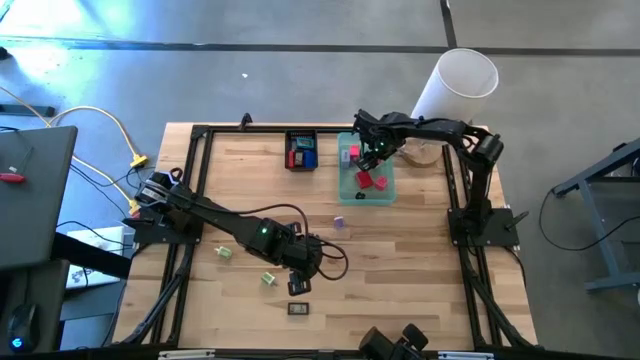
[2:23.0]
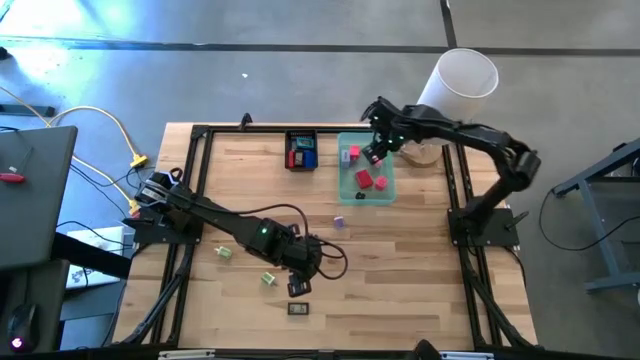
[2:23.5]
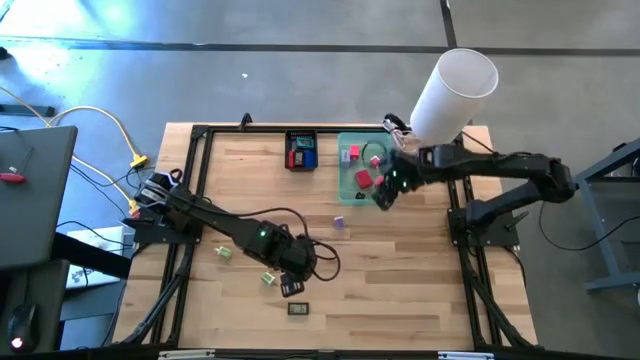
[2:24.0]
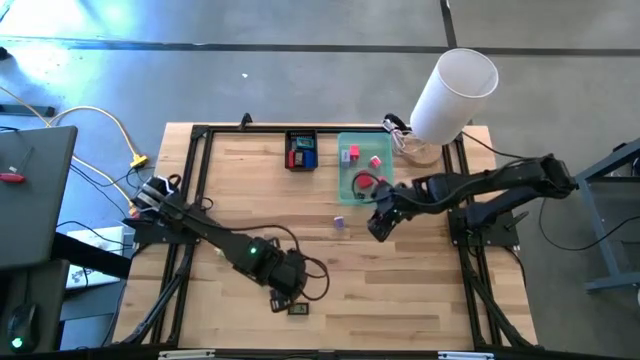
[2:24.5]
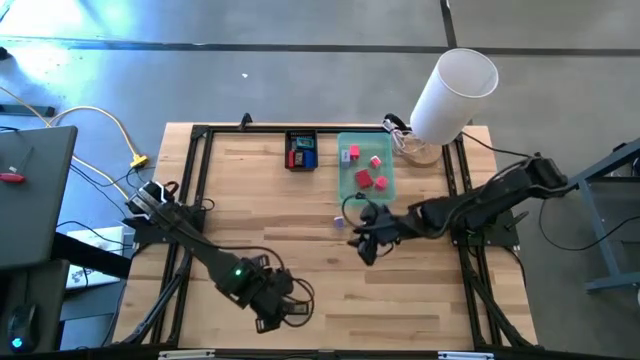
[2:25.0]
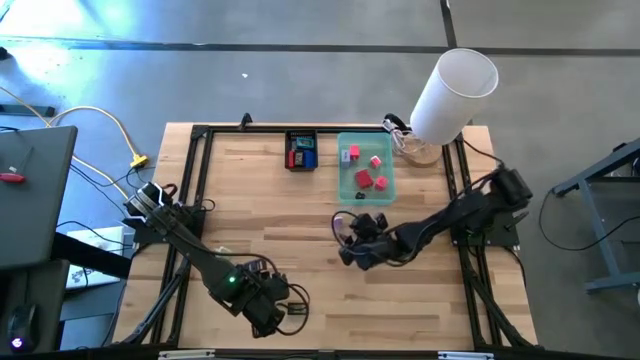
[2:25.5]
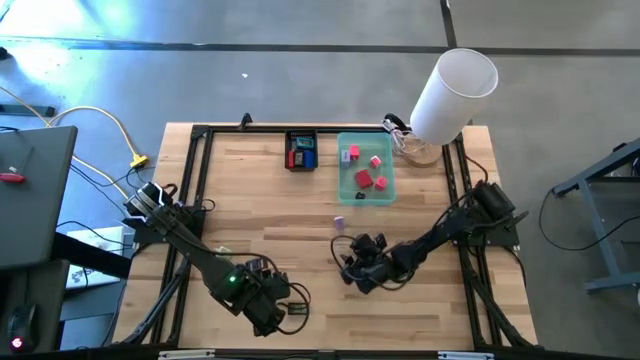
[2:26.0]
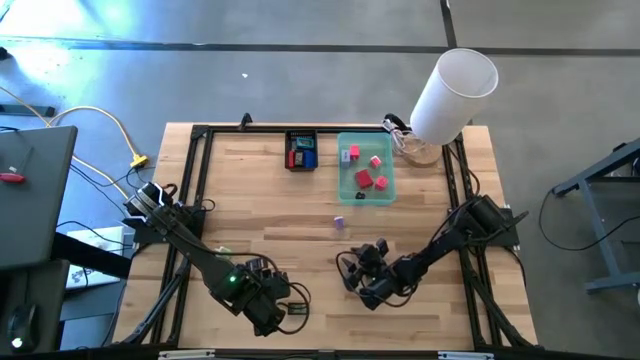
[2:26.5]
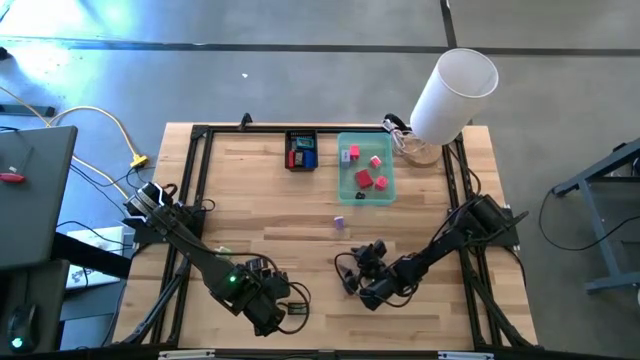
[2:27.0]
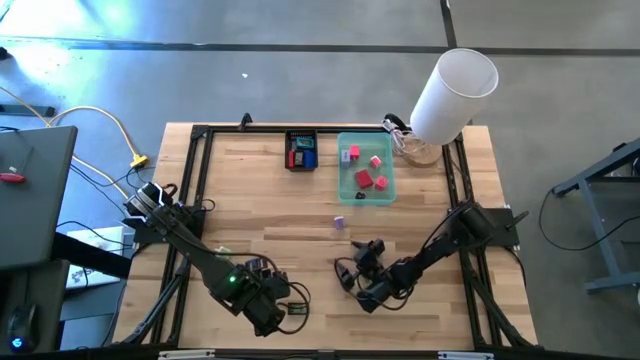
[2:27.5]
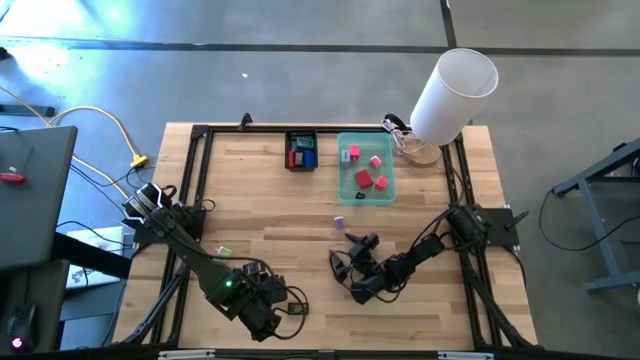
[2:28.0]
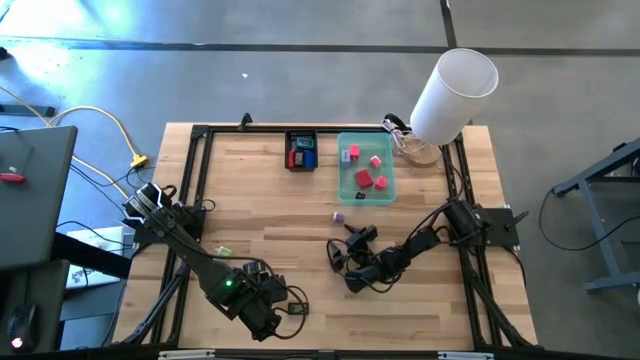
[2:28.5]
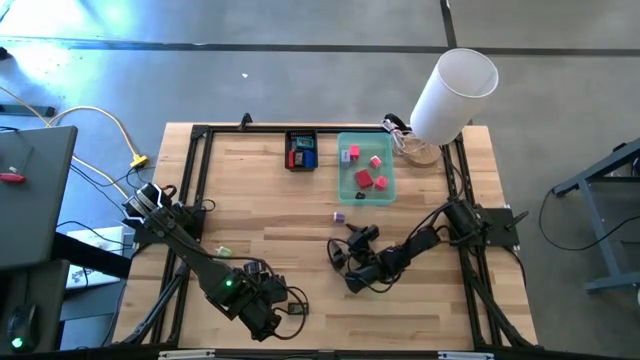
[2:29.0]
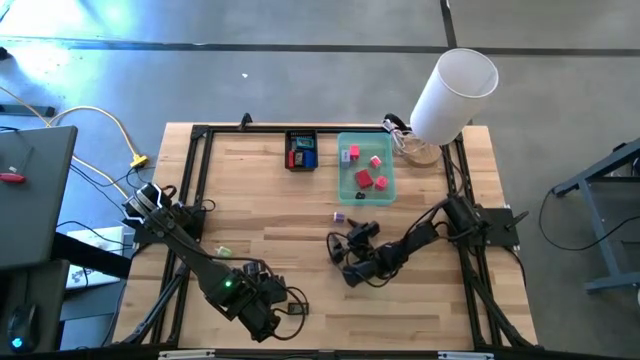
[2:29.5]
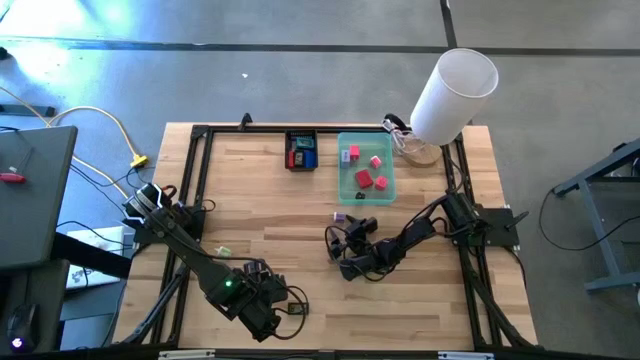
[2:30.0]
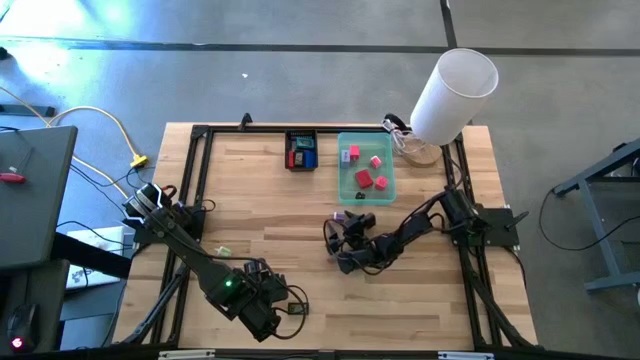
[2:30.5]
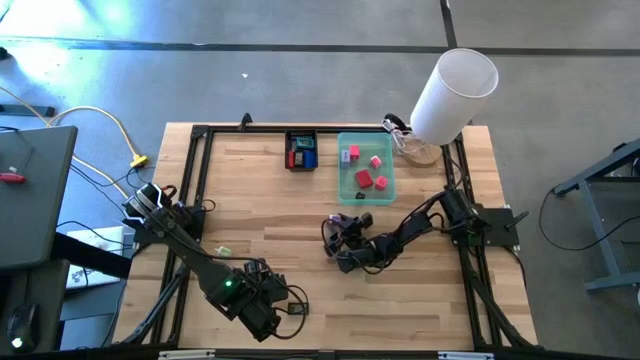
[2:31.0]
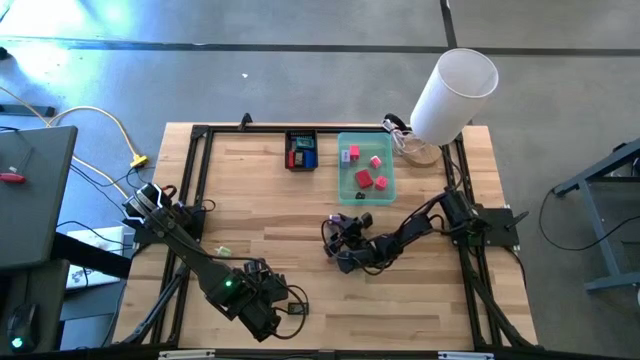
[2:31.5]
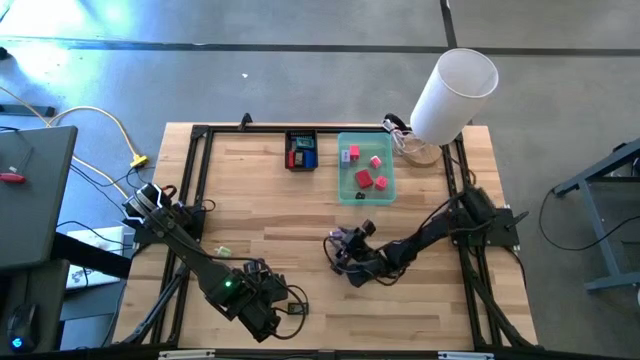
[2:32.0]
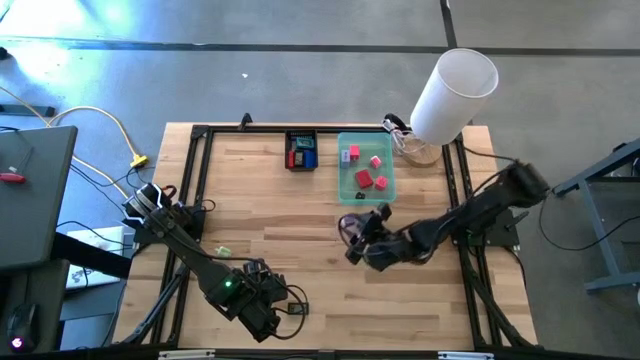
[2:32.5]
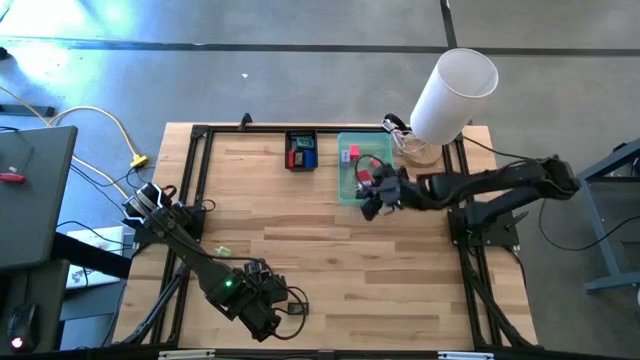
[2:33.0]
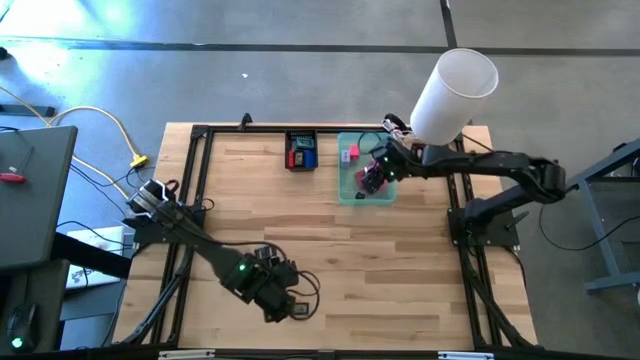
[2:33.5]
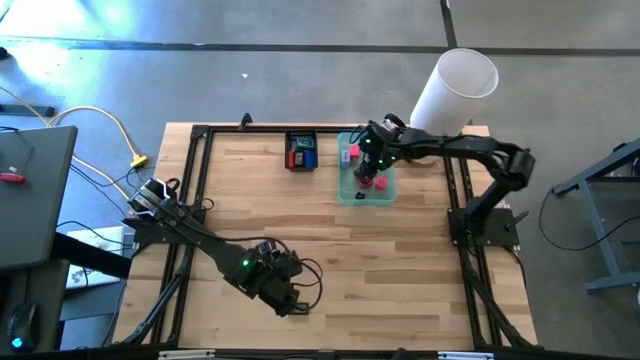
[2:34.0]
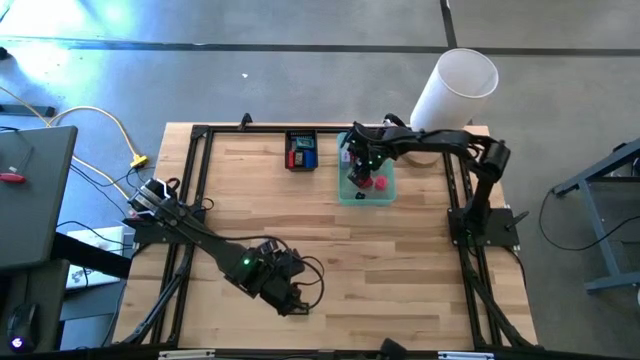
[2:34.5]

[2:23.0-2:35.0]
Task: Pick & Place Office items
Put the dark violet charger adapter into the blue bin

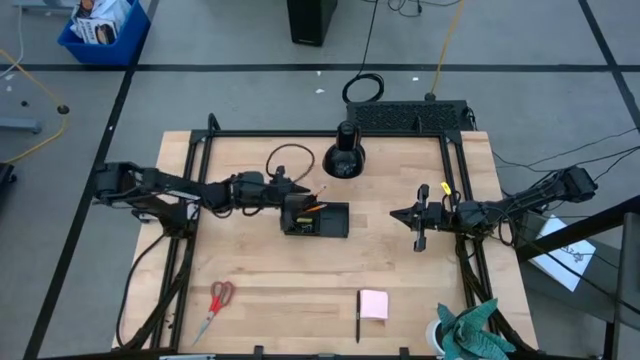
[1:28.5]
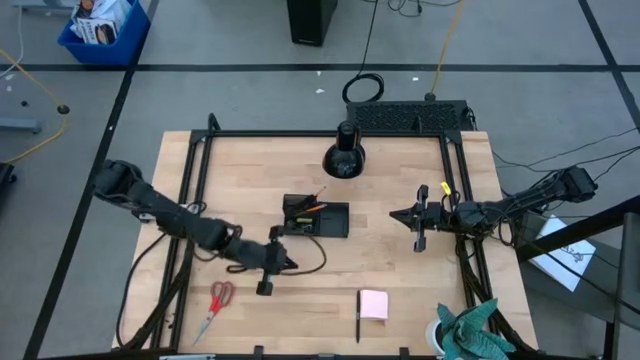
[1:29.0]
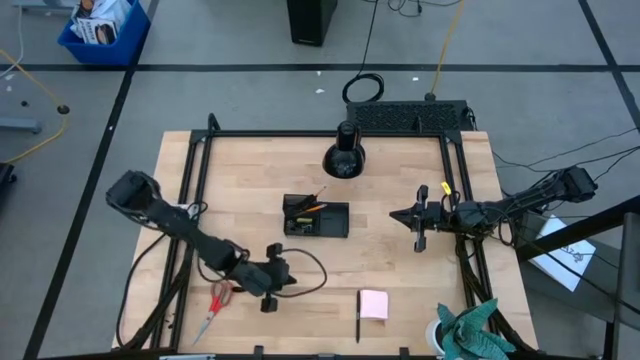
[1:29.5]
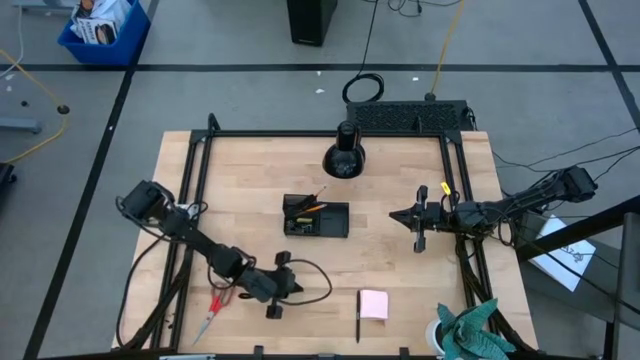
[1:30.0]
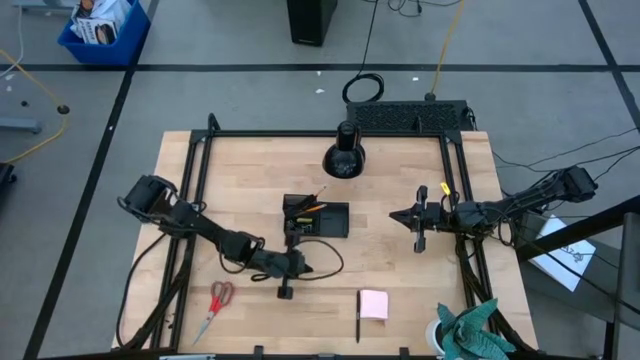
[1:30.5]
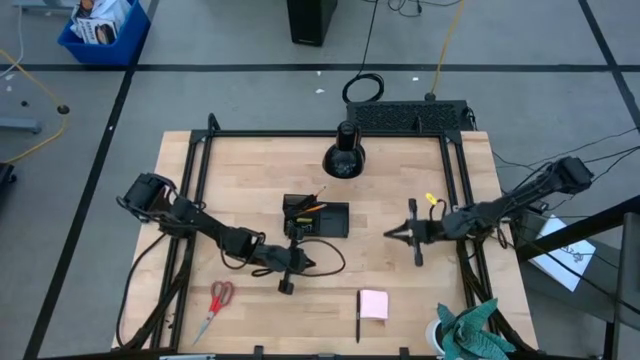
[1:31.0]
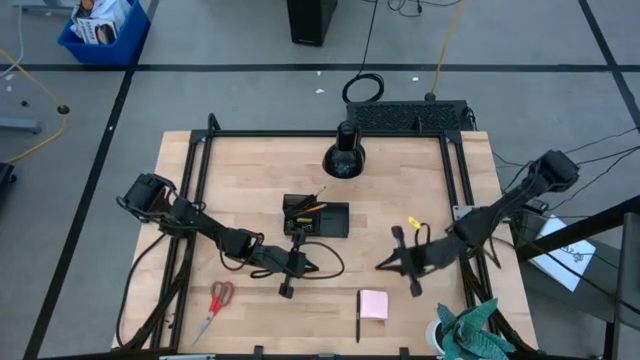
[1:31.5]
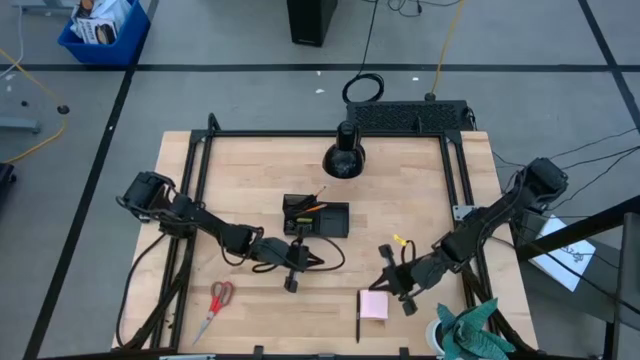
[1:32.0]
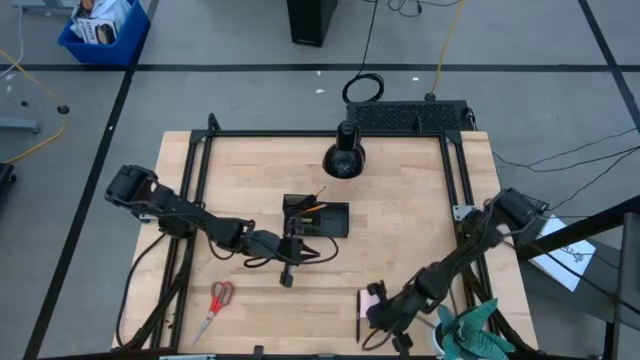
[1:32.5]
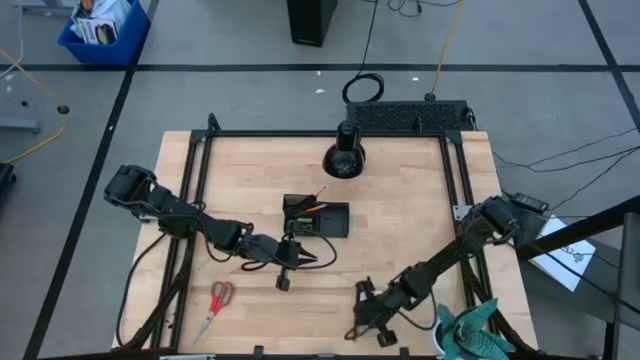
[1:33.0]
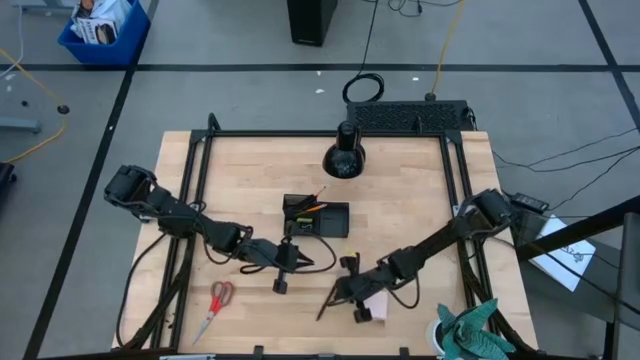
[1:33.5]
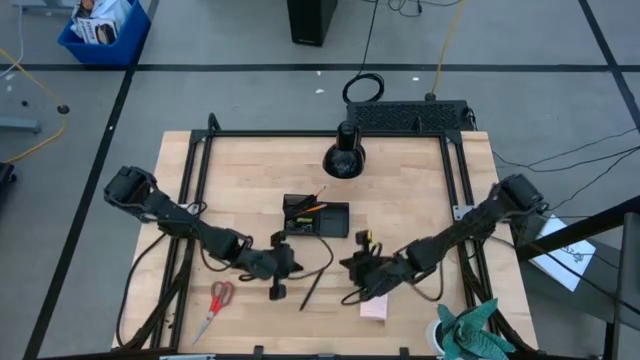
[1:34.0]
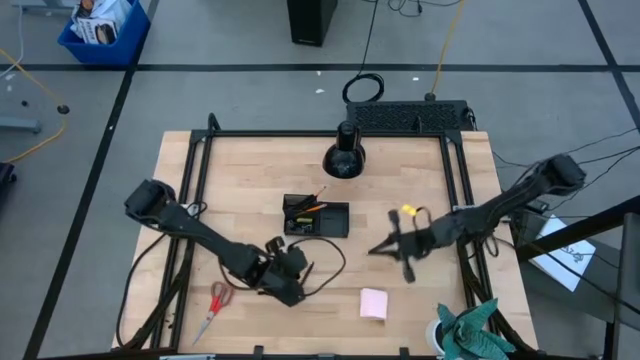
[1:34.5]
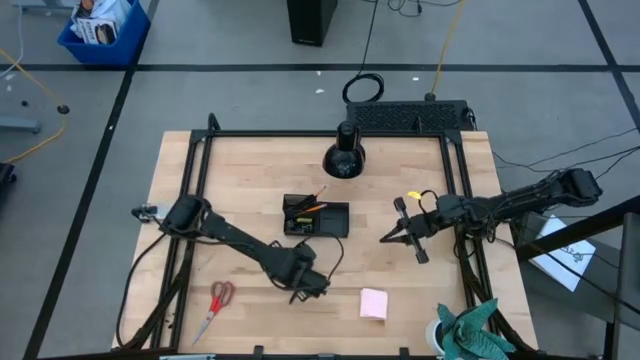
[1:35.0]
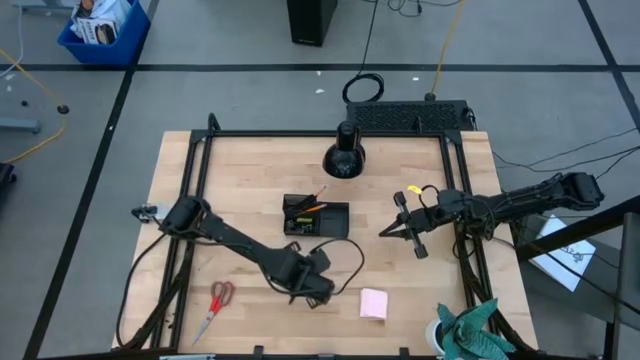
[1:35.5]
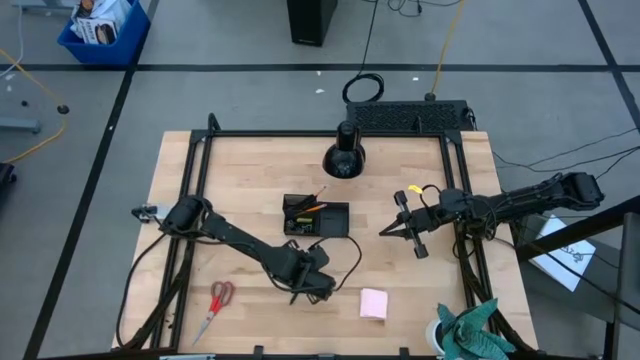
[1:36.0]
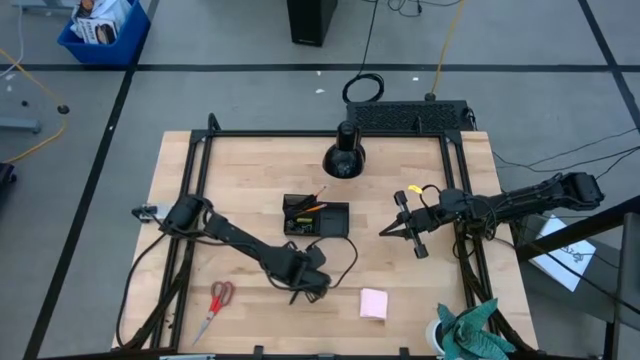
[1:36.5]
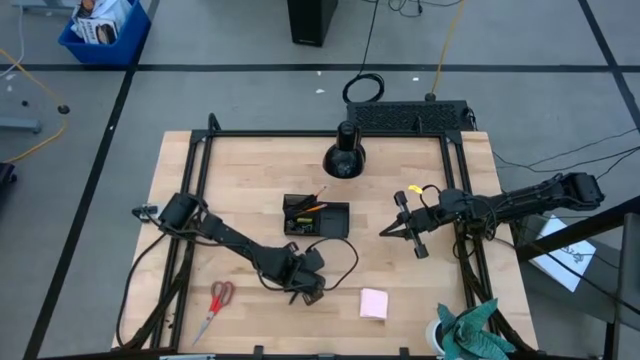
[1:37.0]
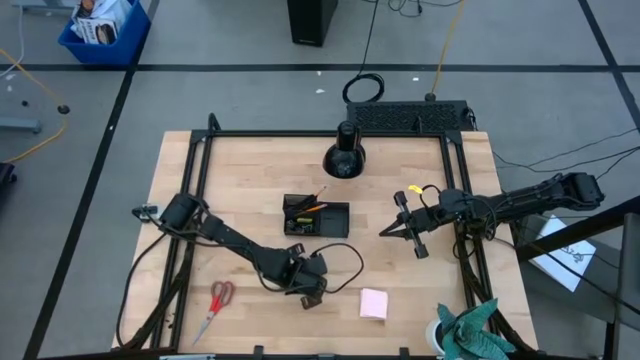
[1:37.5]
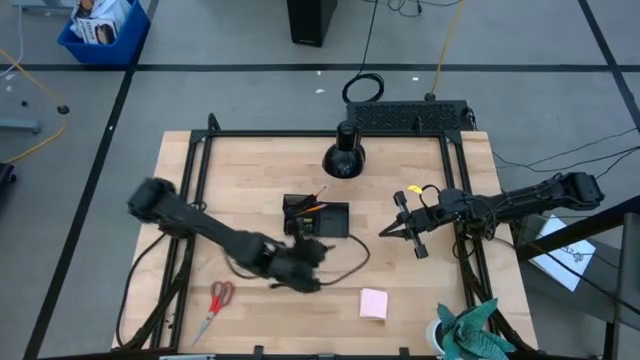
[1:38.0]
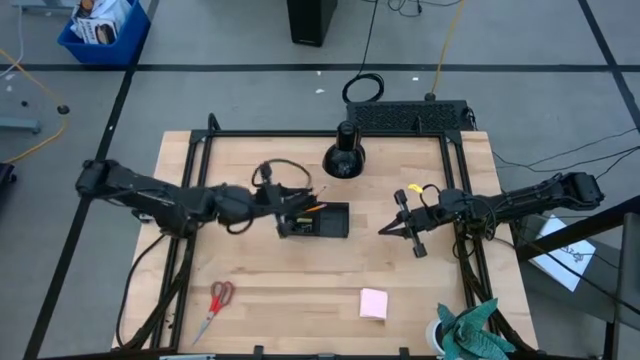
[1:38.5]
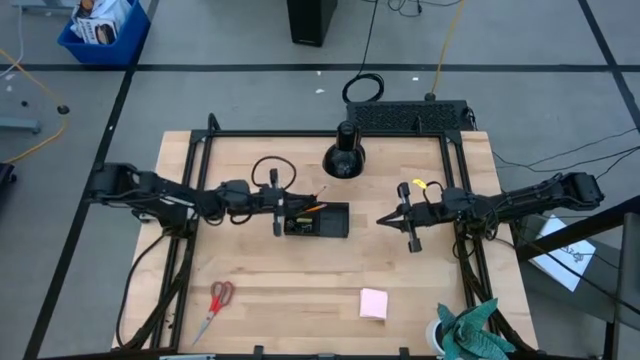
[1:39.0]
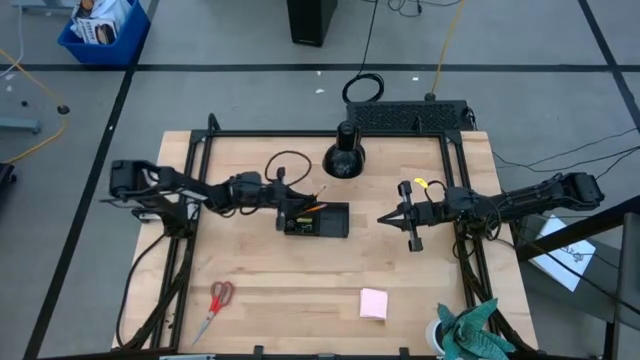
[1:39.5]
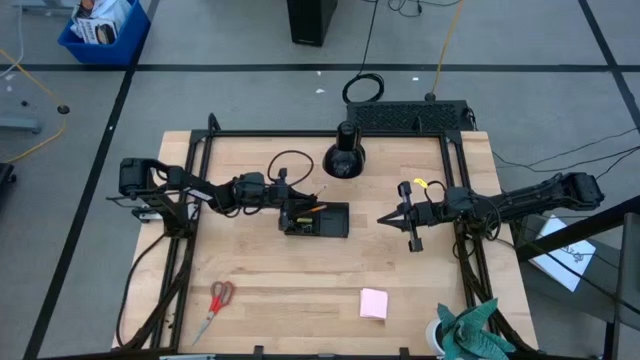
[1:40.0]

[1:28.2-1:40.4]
Task: Pick and place office supplies into organizer
Put the pen into the desk organizer
